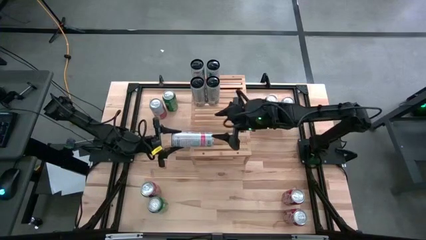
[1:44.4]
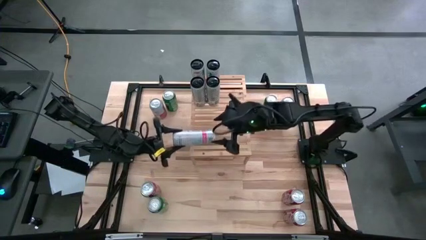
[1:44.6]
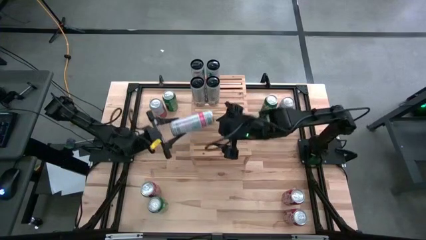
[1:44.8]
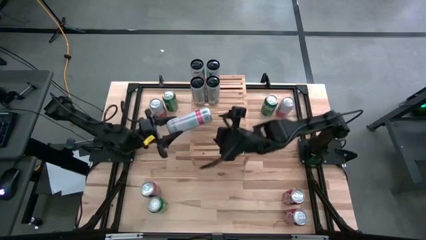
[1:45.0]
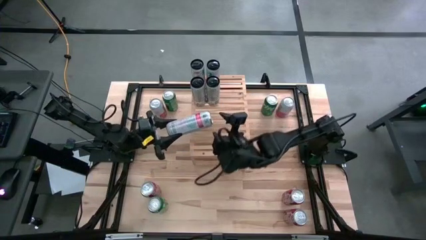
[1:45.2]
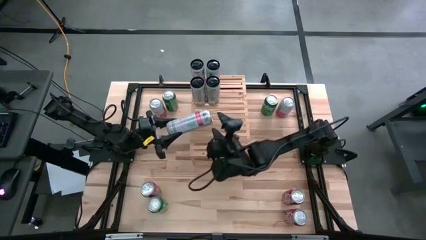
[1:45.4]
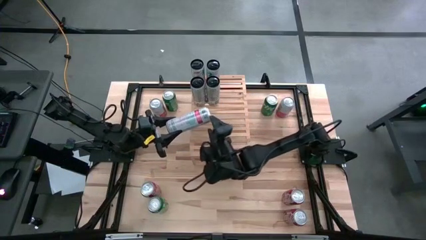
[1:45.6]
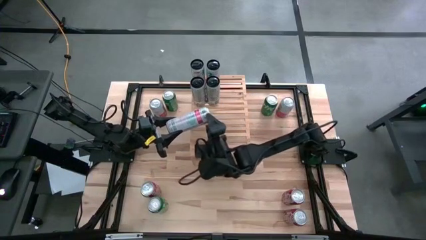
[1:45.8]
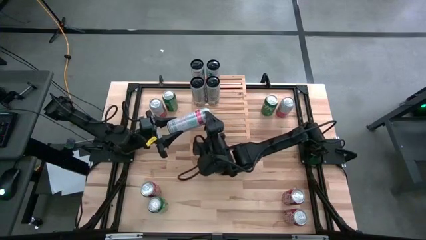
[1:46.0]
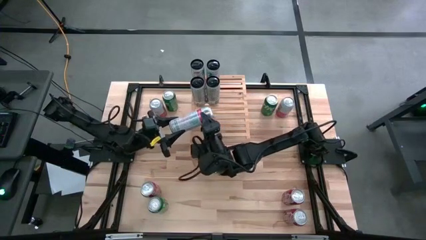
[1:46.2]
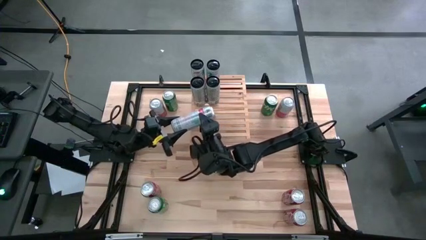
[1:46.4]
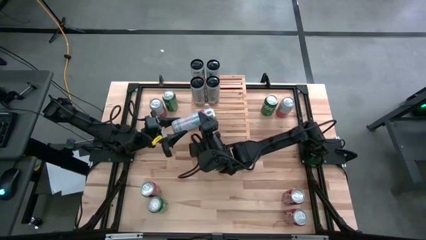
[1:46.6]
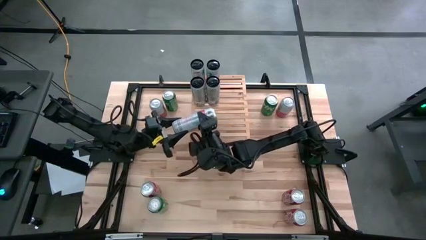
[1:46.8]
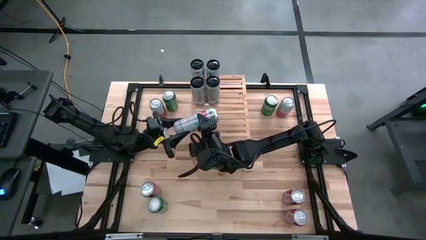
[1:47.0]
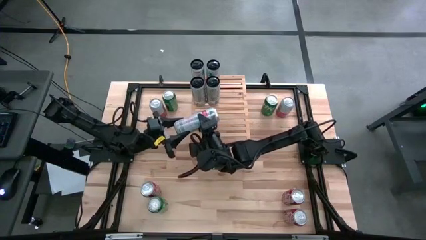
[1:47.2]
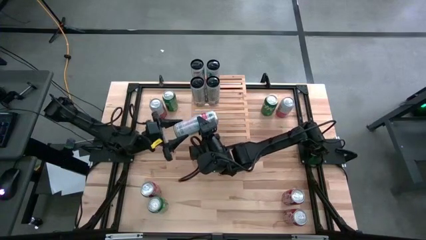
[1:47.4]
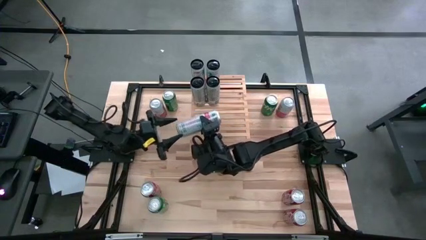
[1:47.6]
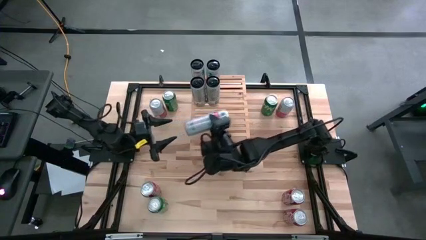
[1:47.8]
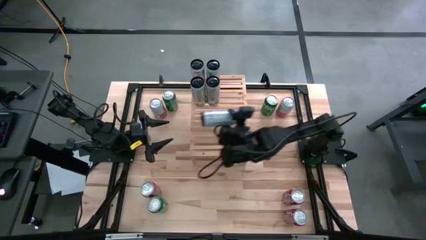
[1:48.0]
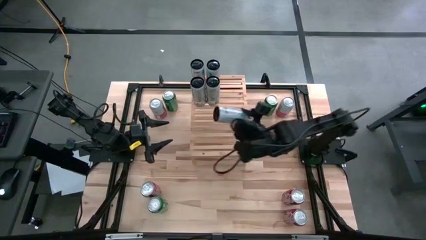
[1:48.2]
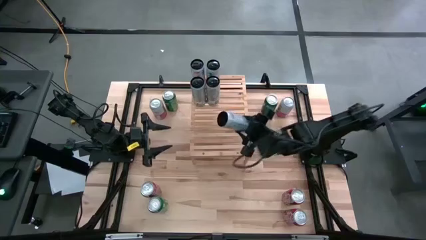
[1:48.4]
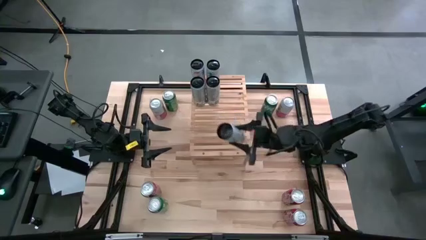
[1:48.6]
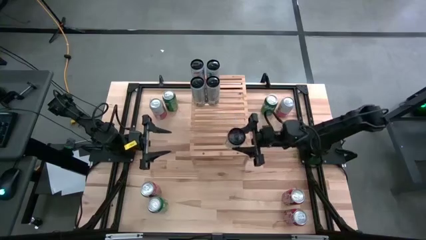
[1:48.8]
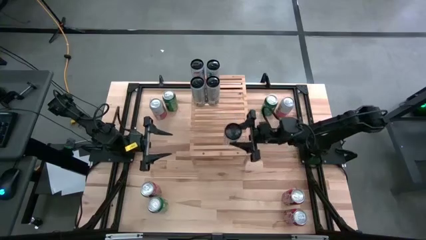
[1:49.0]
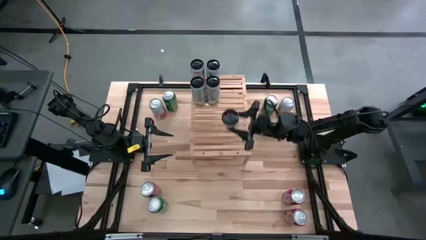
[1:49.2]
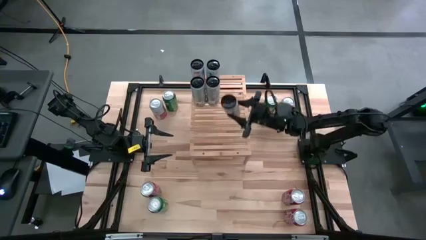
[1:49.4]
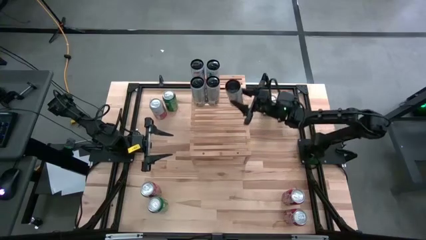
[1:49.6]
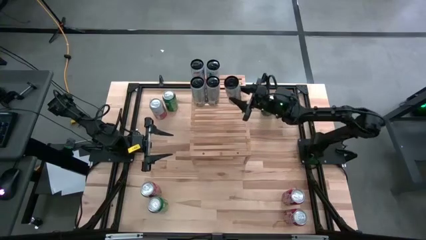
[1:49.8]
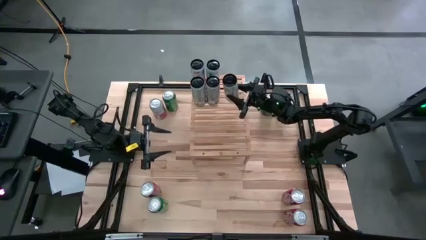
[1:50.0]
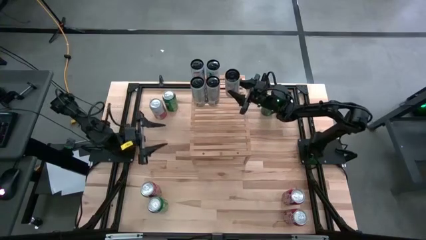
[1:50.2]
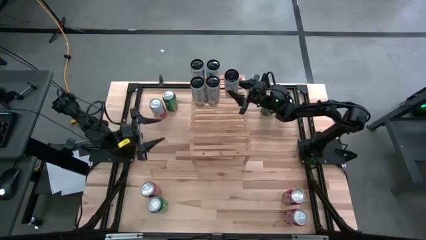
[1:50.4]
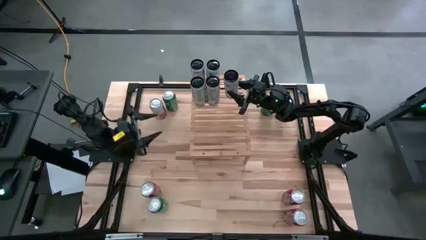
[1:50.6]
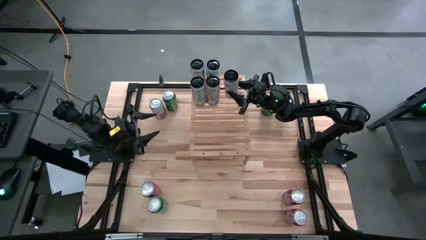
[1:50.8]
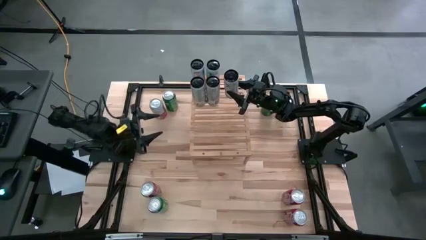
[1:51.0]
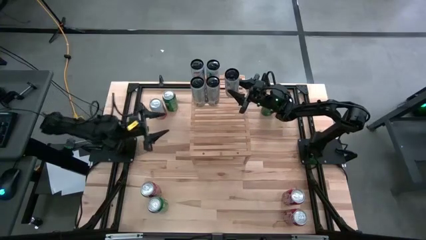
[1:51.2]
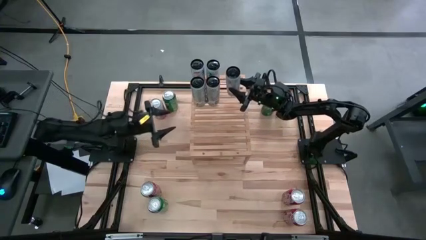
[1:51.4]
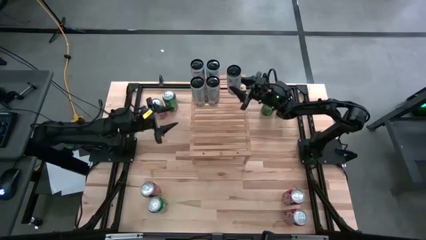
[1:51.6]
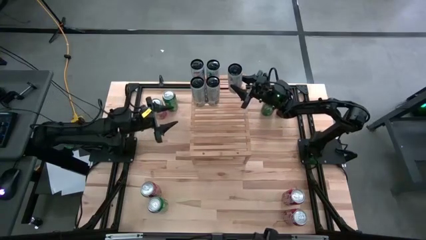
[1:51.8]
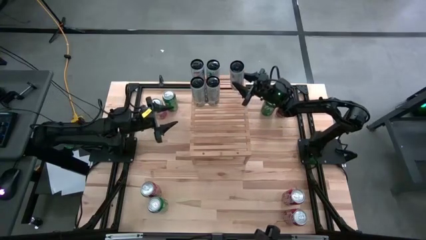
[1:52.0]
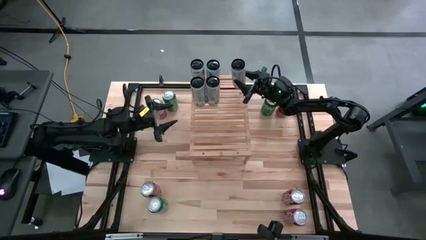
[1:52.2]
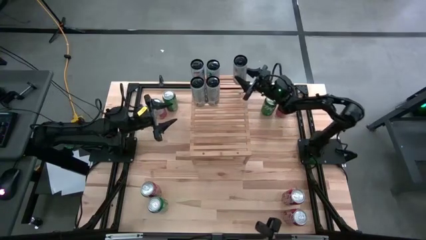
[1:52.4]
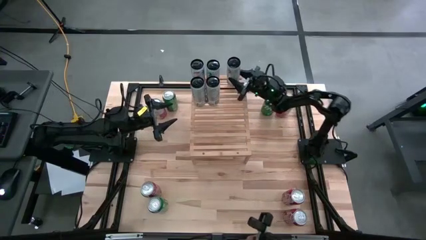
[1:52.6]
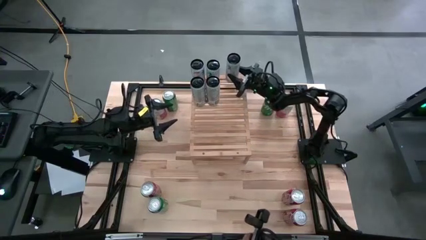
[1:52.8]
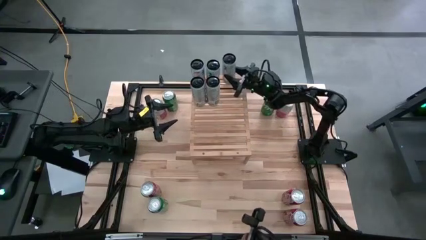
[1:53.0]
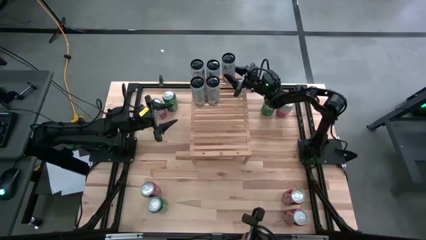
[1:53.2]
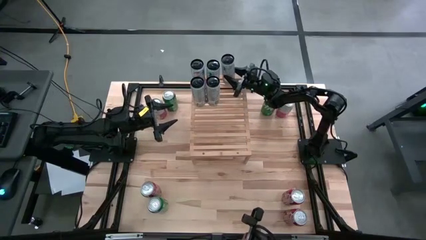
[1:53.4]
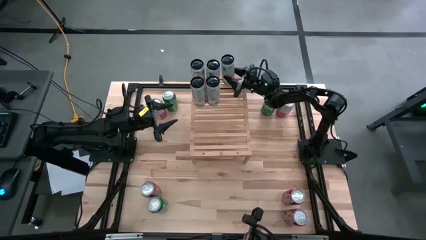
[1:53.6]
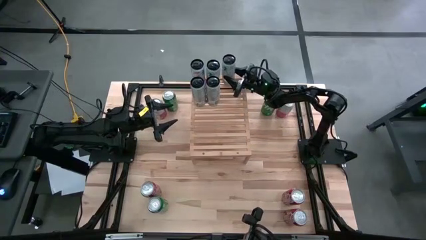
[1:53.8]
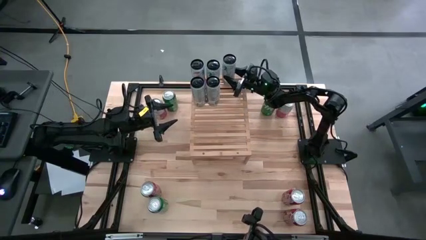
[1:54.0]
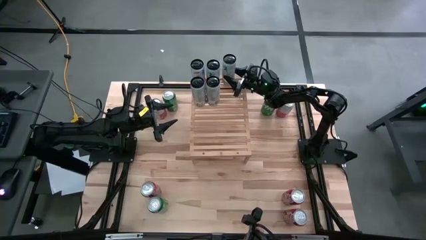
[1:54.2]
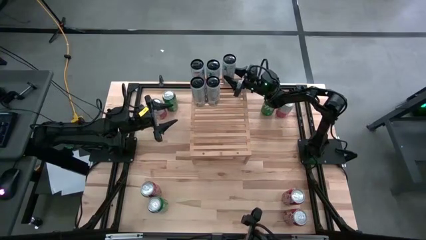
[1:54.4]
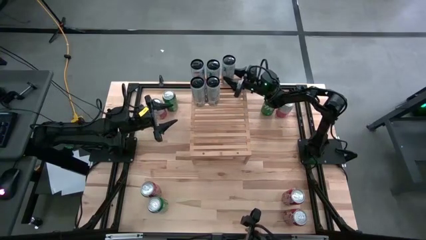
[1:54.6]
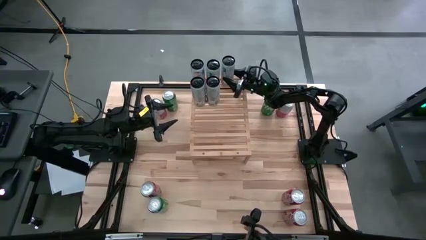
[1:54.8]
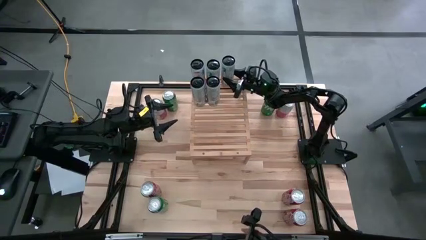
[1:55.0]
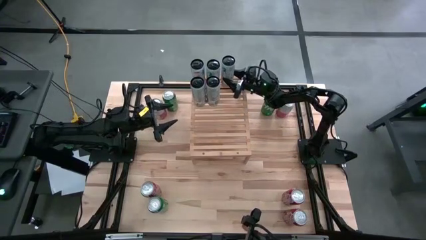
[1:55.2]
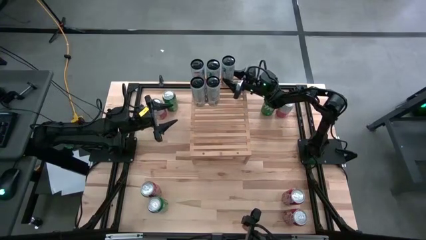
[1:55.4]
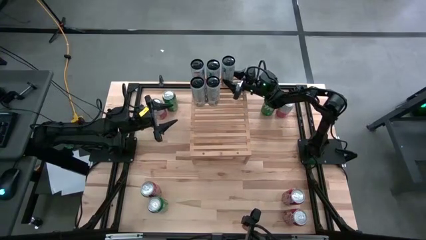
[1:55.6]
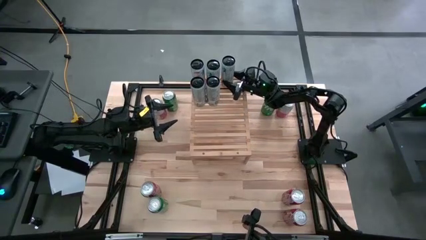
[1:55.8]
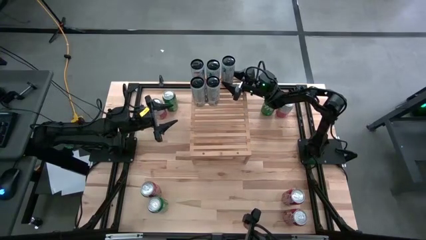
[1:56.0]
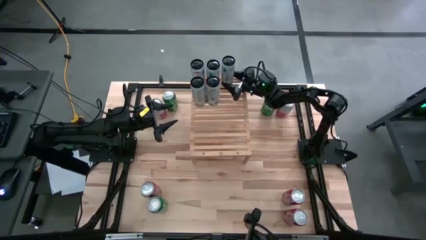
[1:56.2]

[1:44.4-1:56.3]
Task: Place canned beverage on shelf
Put the white pink soda can aligned with the other white pink soda cans on the shelf

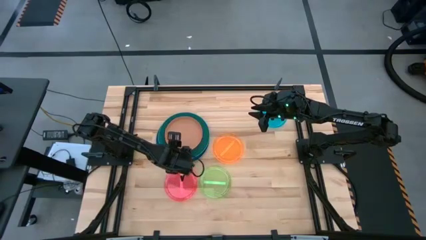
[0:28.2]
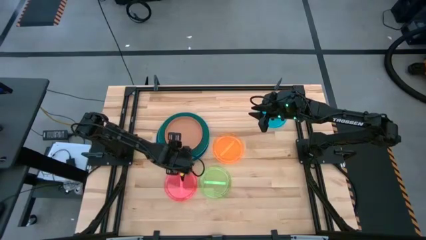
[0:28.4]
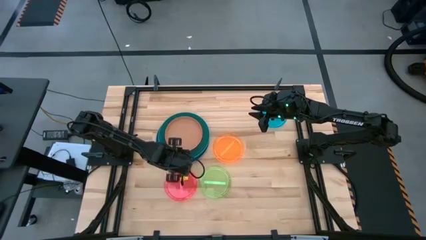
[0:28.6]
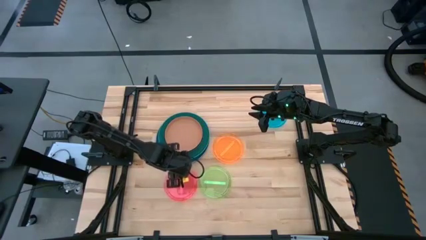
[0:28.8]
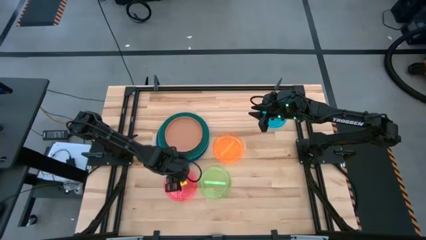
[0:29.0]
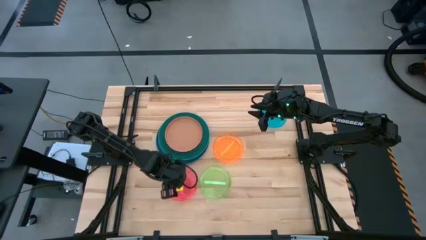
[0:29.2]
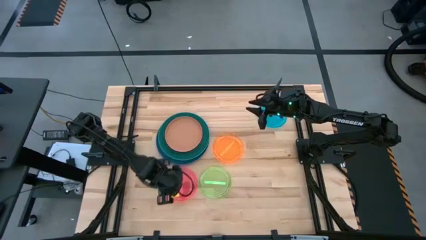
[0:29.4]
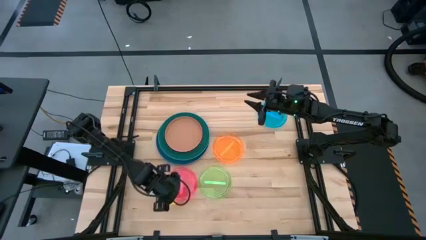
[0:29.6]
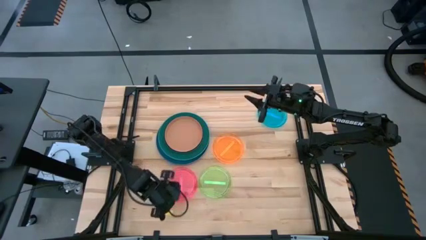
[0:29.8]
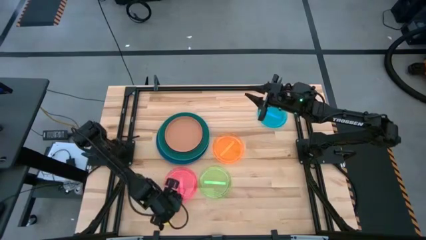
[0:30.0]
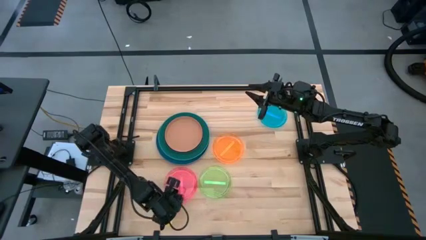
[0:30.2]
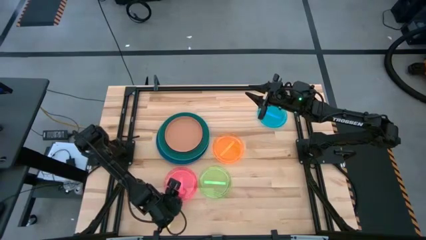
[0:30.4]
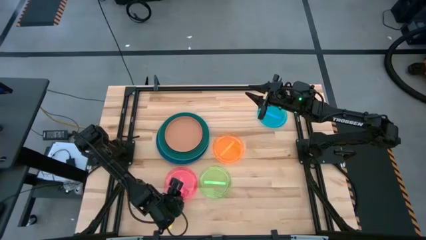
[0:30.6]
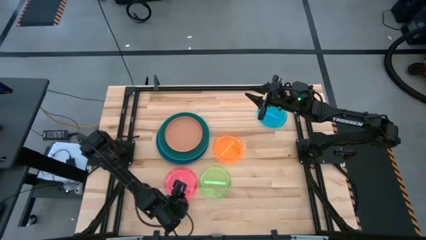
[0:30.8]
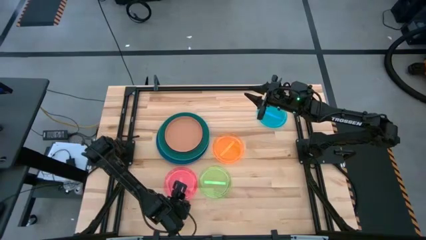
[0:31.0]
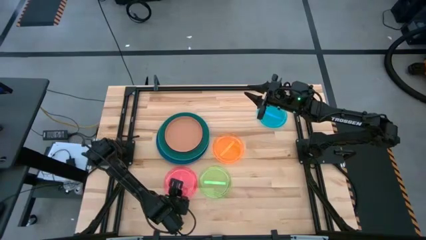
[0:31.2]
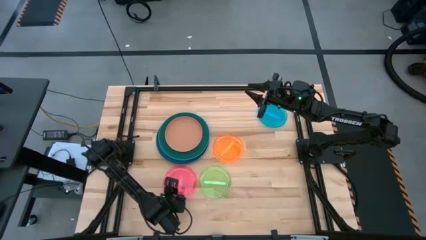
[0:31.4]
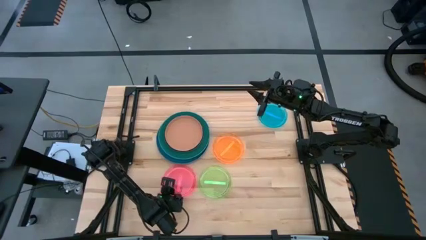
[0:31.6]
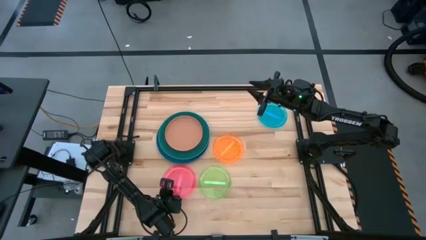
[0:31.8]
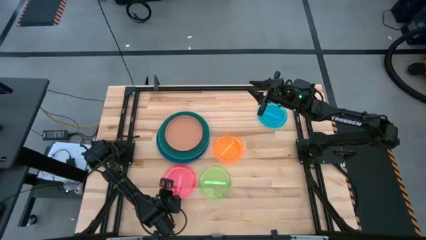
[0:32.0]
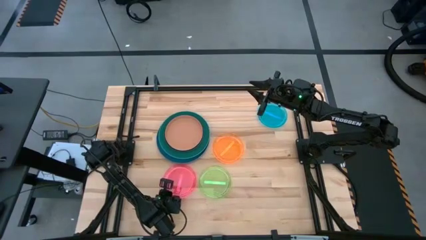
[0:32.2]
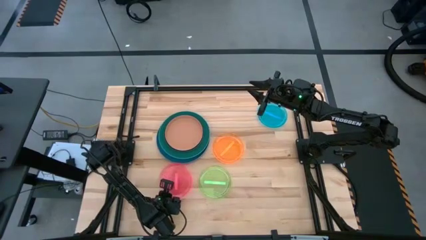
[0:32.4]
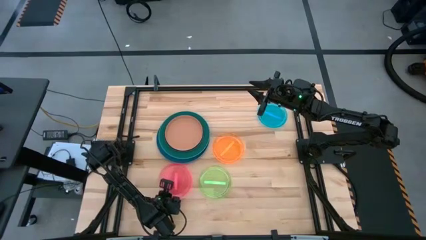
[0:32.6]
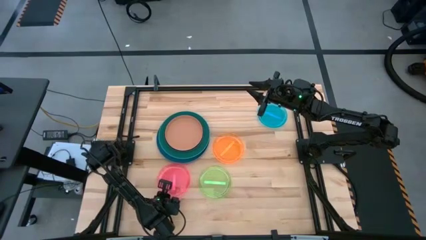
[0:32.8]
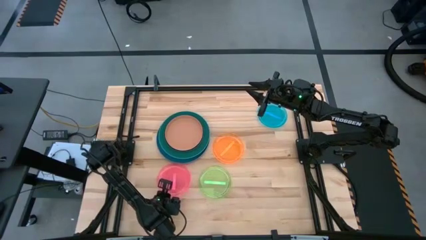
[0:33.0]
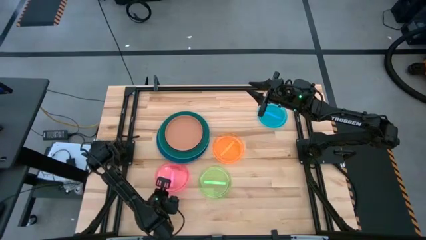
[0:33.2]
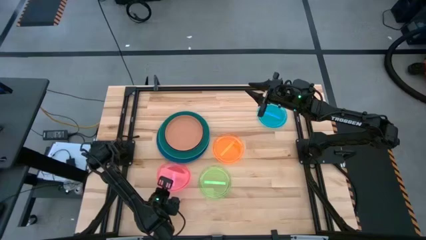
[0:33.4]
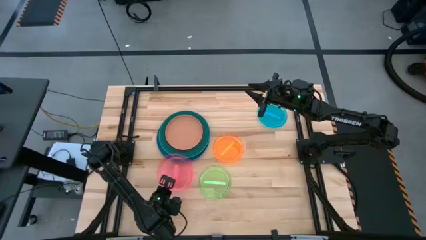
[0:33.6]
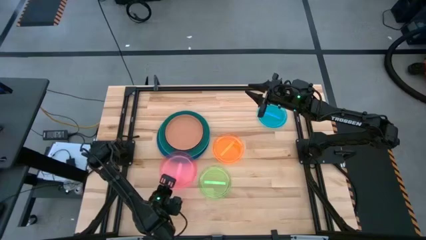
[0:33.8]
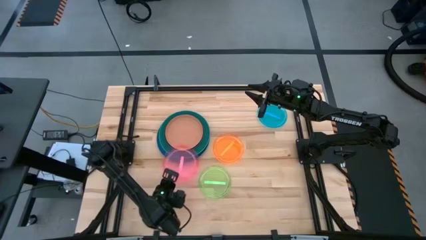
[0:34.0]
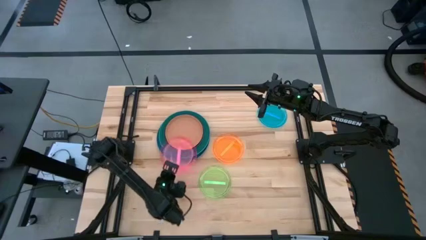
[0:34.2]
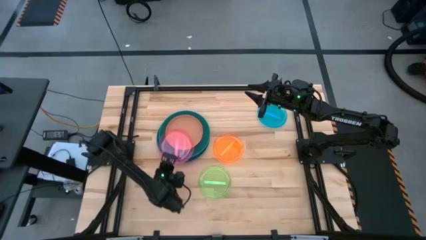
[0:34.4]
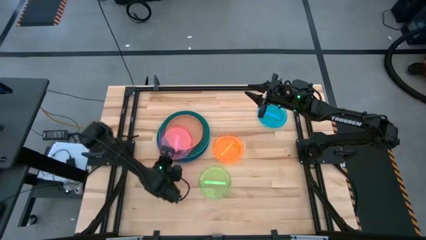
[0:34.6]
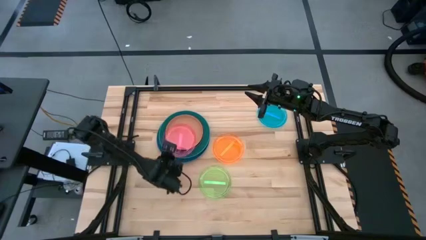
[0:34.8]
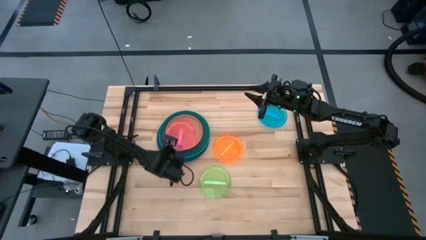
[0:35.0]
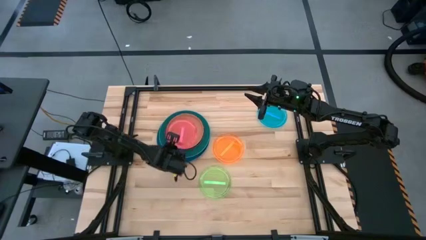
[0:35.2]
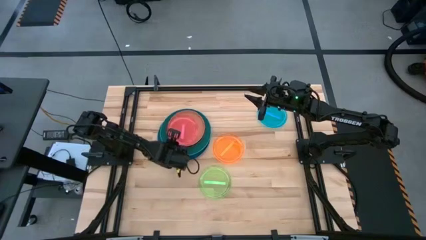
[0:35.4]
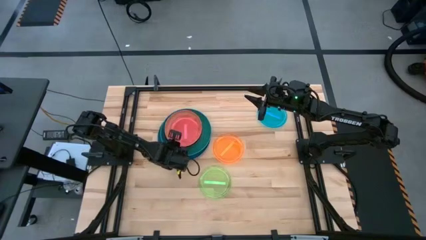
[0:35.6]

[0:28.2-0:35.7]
Task: Stack plastic plates
Stack the transparent pink plate on the brown plate
